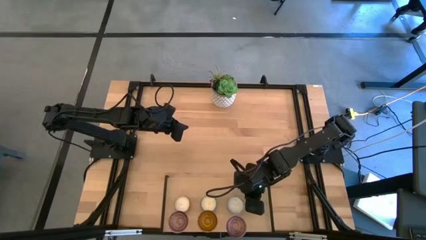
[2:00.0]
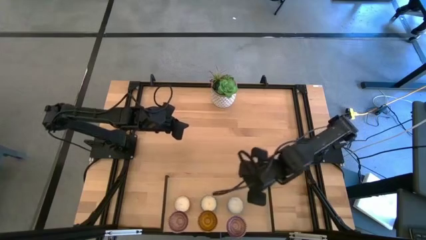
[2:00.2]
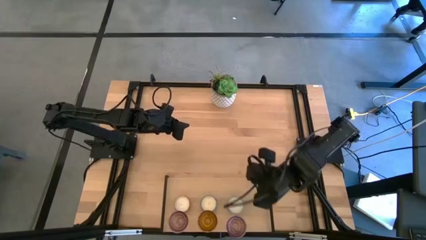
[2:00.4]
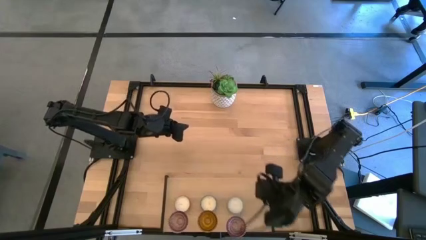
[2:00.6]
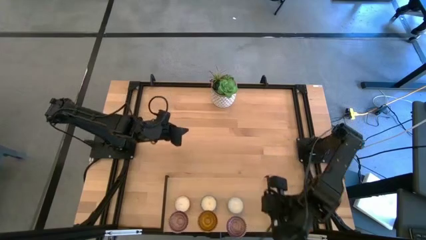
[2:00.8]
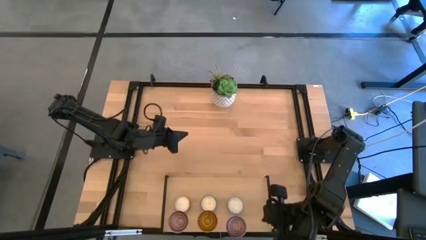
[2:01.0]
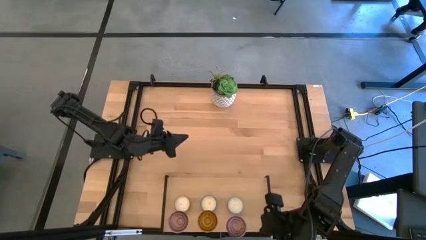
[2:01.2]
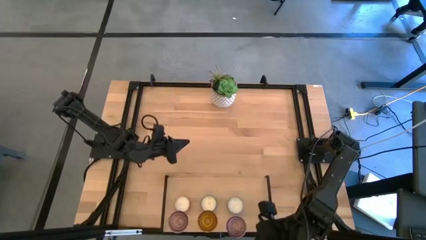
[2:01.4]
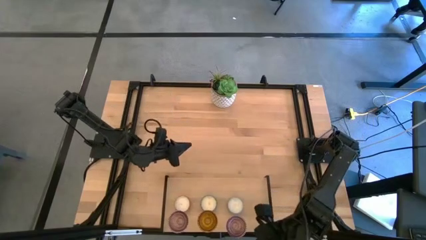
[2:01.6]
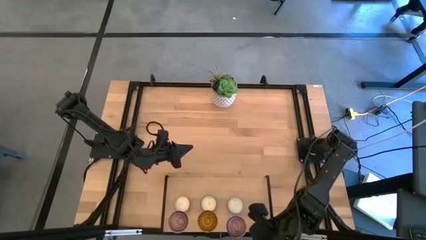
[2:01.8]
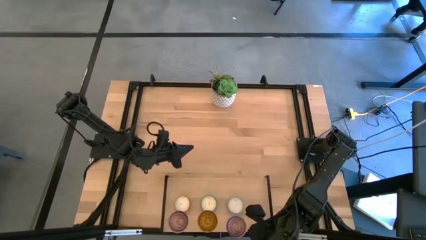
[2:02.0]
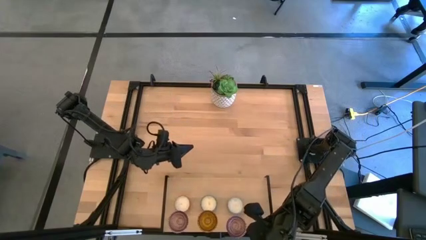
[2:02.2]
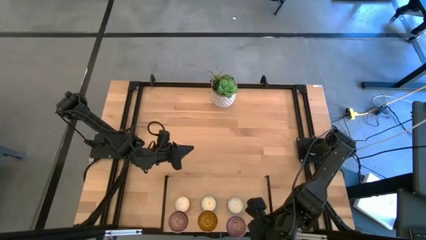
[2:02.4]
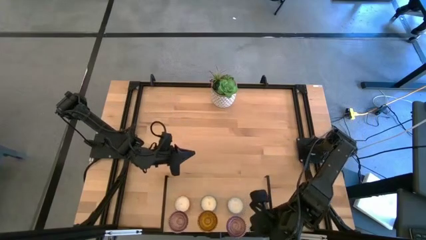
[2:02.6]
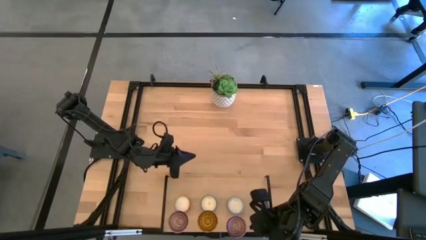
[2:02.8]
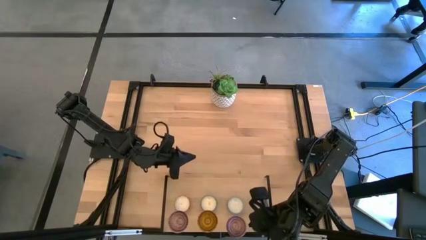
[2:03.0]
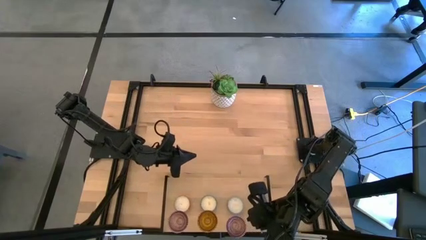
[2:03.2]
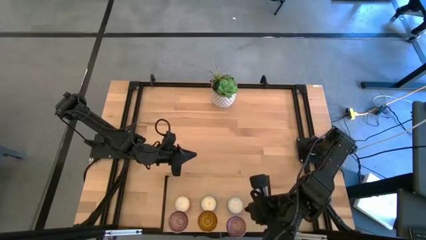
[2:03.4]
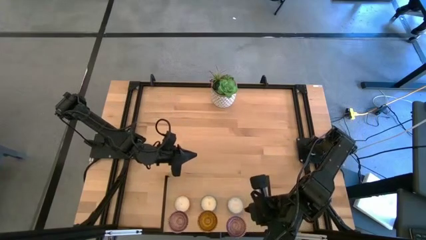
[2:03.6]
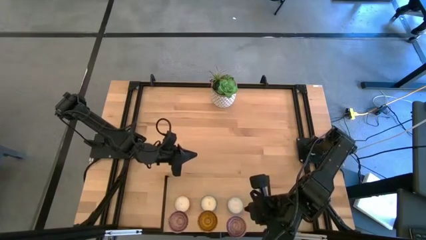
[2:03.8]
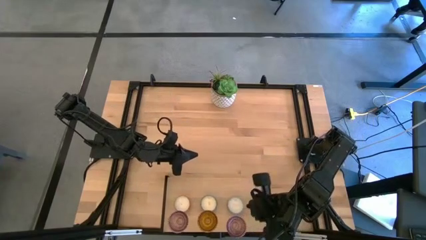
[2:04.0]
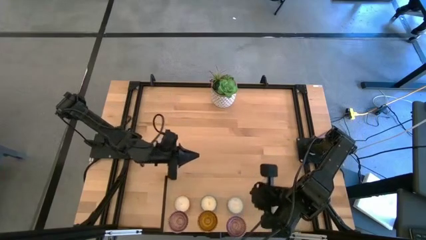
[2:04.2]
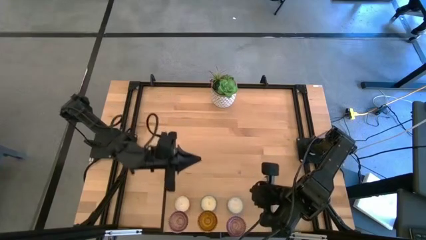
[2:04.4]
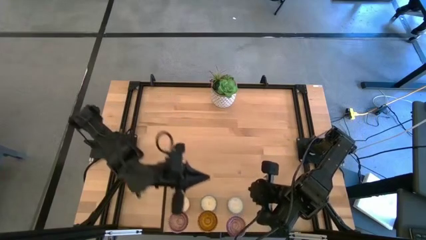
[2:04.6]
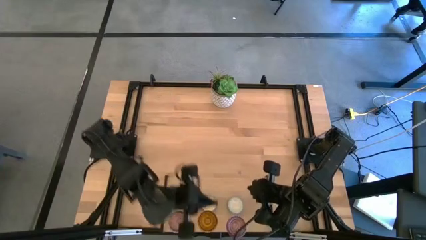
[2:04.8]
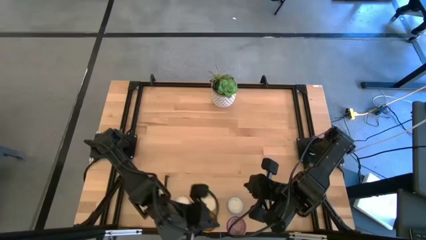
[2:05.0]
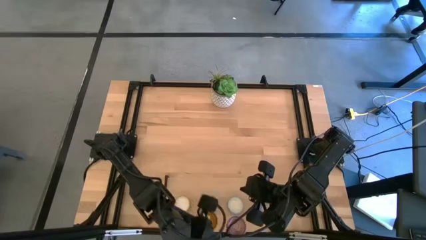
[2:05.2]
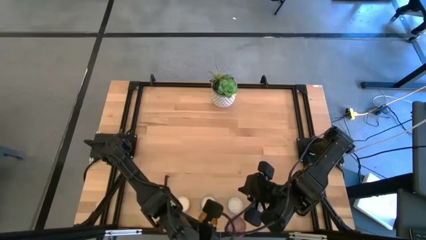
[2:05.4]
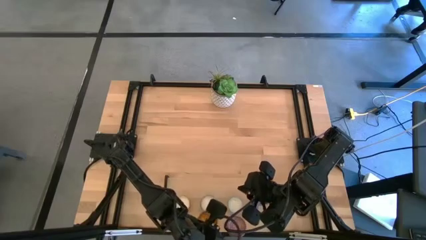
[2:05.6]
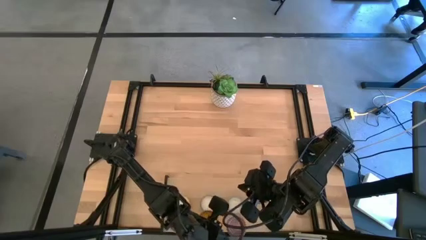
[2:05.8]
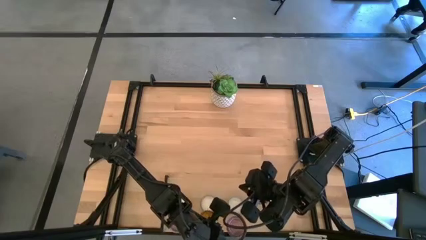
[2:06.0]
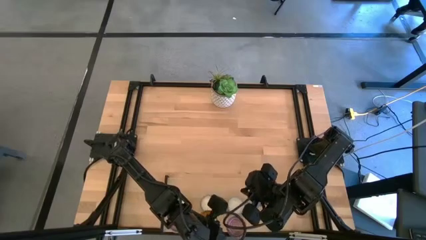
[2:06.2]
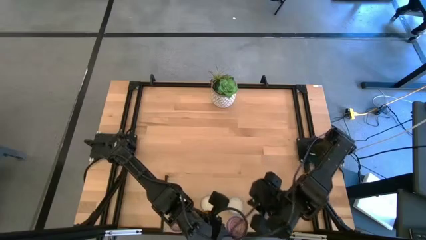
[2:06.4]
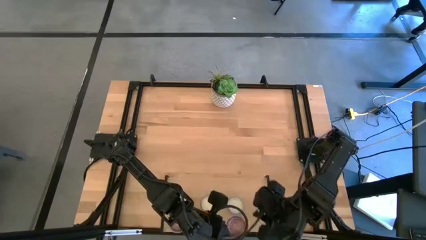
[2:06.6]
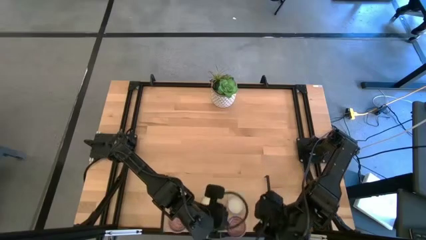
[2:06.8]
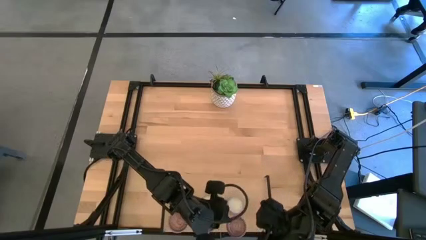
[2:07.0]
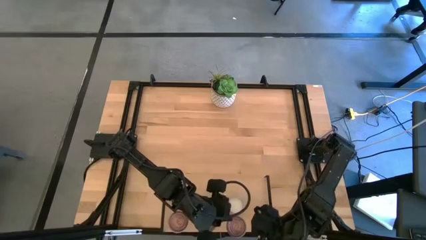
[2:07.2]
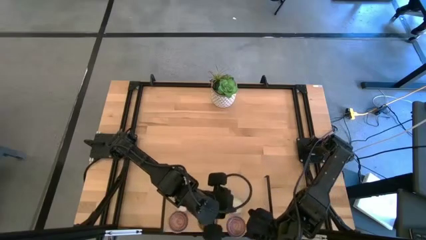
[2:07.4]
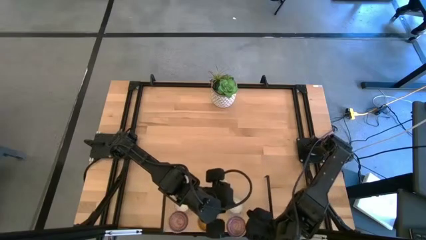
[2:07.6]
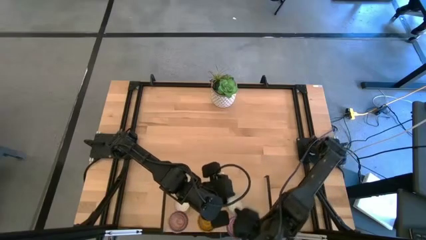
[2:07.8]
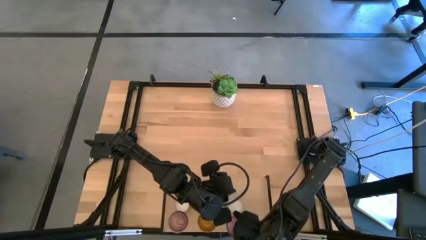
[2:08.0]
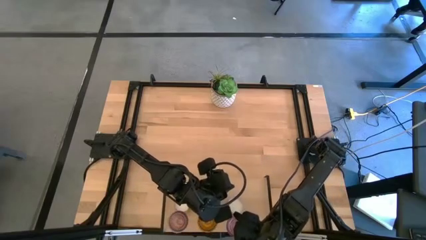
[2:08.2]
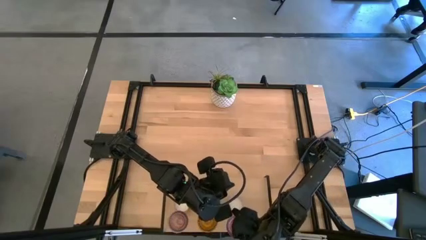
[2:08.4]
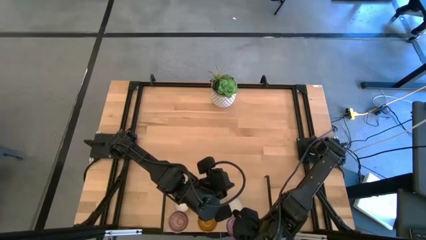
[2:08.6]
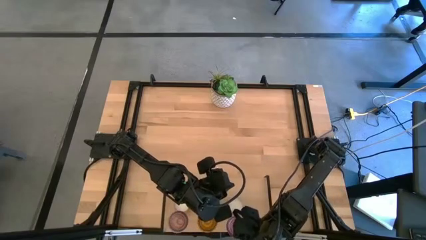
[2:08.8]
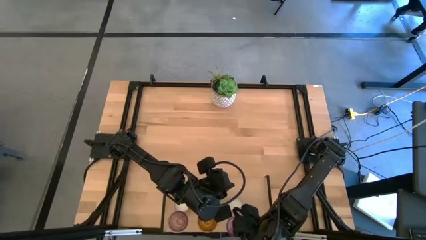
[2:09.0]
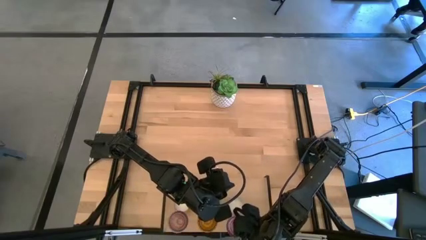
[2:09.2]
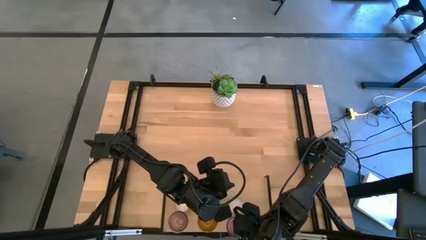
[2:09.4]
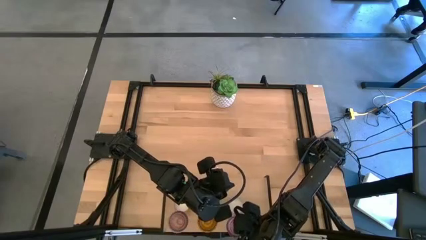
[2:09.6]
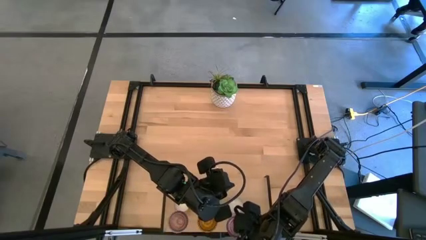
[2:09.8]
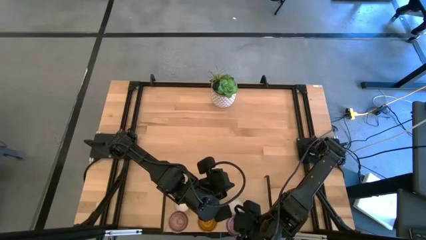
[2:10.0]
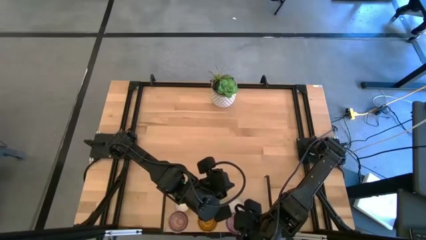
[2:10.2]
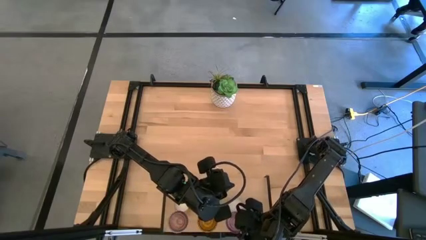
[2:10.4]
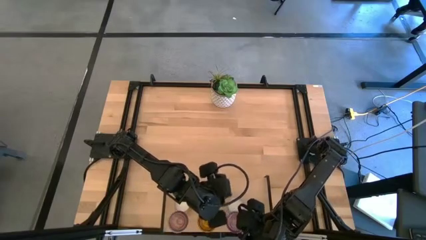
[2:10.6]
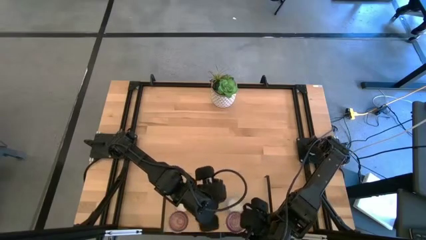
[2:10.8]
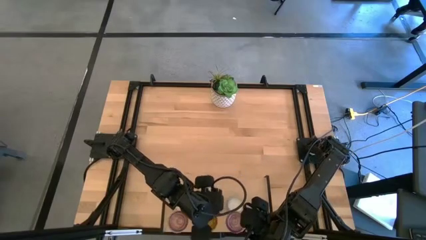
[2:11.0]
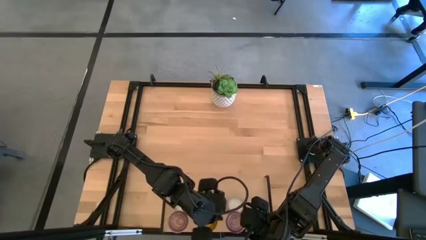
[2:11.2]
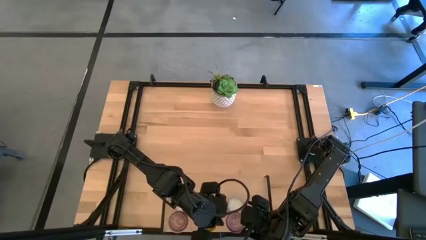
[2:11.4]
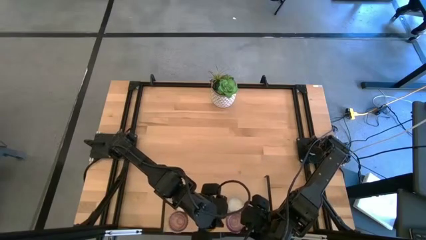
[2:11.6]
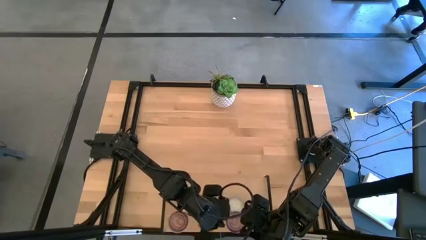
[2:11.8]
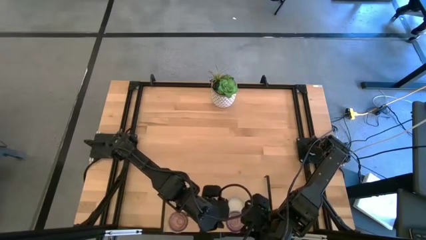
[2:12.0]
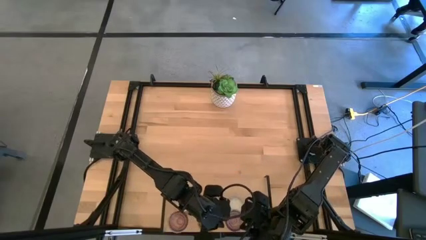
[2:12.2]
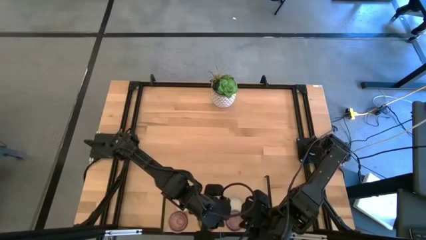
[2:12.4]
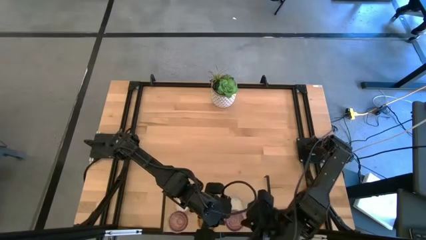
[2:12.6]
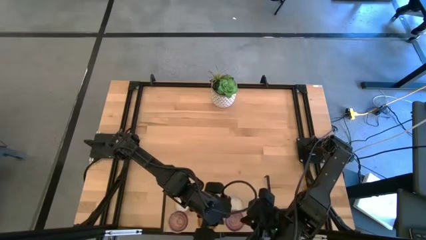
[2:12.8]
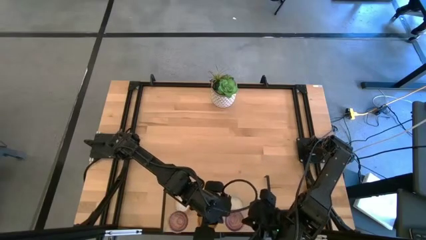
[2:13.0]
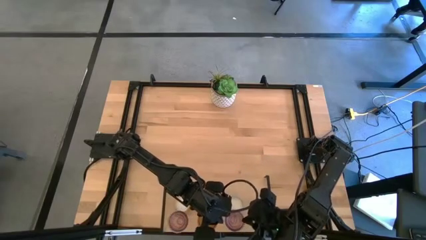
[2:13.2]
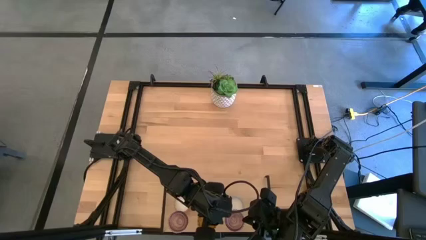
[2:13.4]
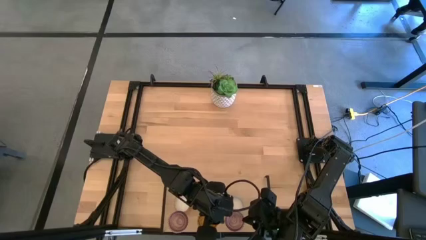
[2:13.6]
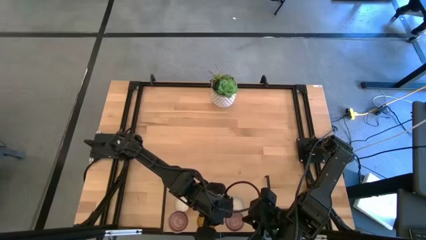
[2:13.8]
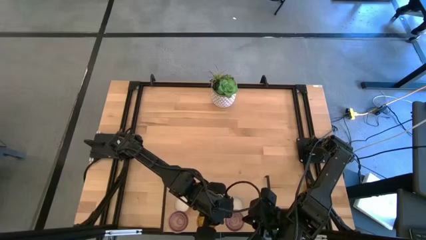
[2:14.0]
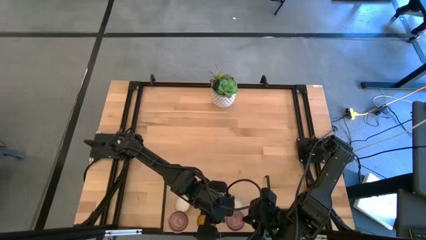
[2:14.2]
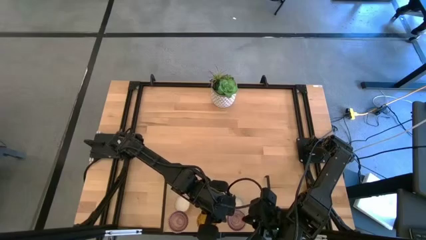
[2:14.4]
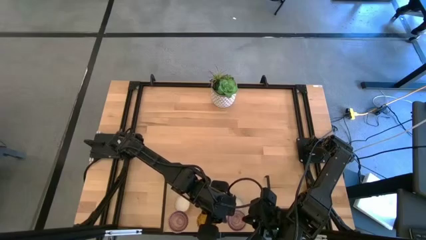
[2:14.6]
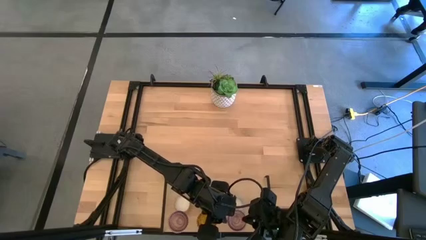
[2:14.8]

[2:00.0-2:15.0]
Task: Pick & Place candle stick holders
Adjust the pink candle holder on the shelf

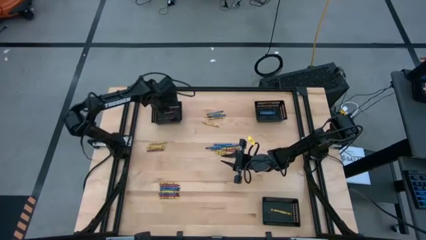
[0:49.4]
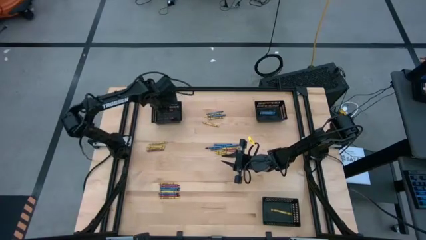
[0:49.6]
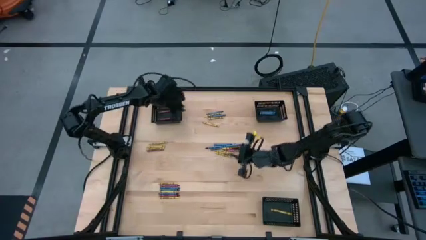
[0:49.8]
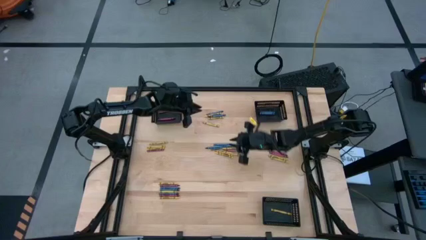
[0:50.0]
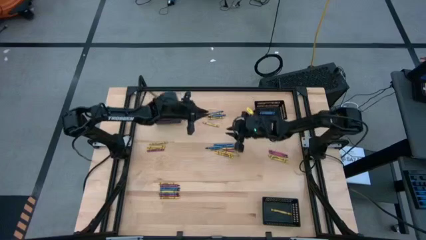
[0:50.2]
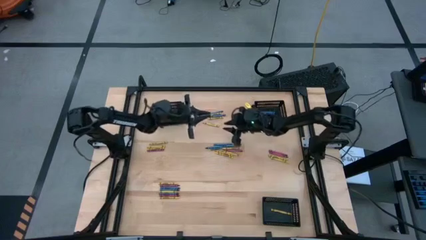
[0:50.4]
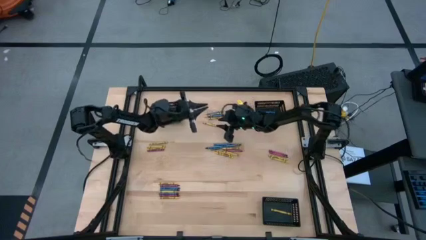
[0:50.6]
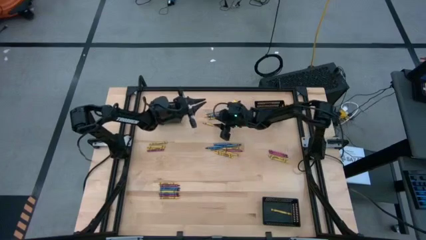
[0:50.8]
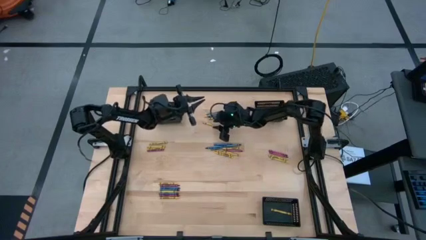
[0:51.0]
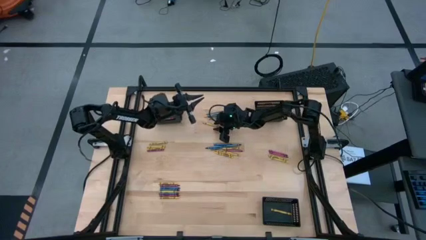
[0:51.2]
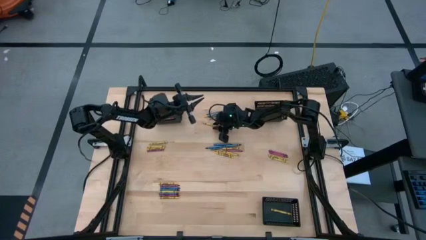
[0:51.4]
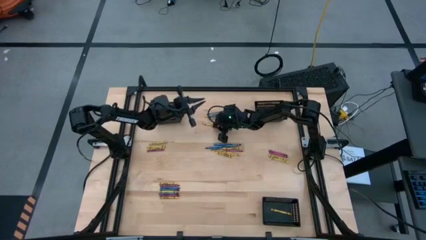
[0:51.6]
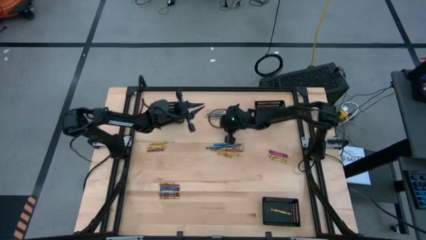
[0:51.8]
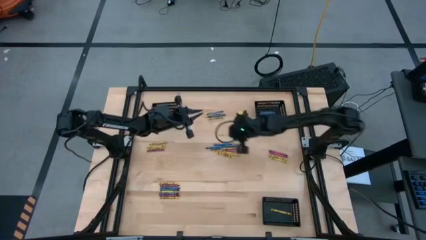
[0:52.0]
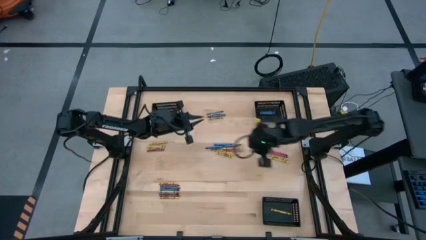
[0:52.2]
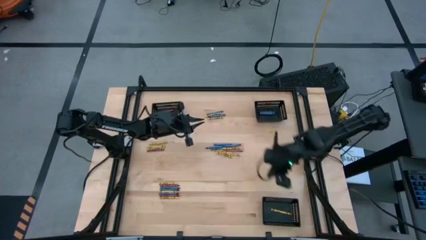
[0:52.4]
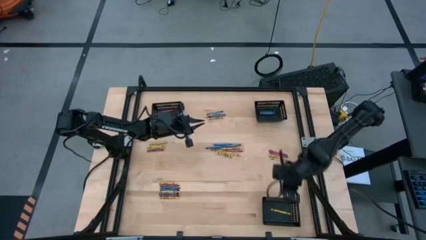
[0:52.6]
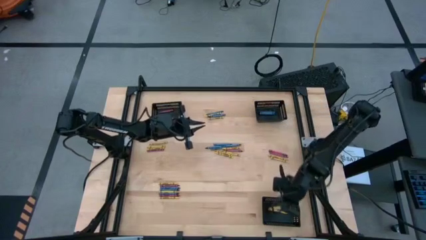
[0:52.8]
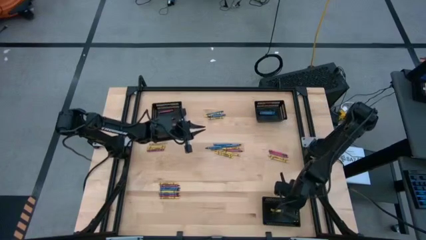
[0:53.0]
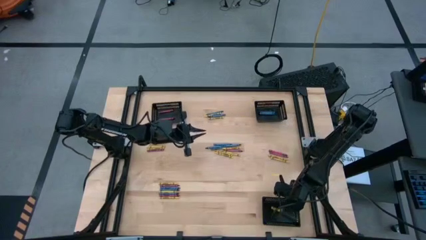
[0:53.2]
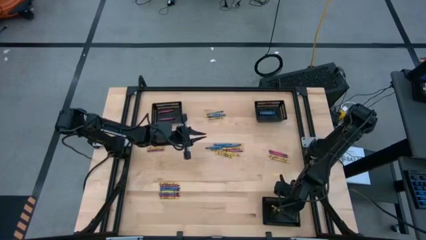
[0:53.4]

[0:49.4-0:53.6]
Task: Sort crayons
Put the yellow crayon into the bottom black bin
